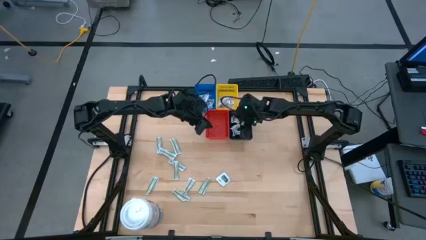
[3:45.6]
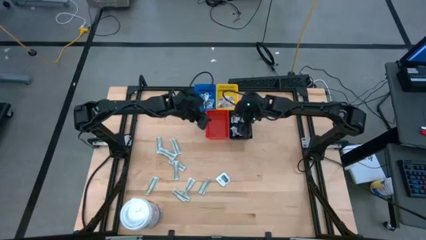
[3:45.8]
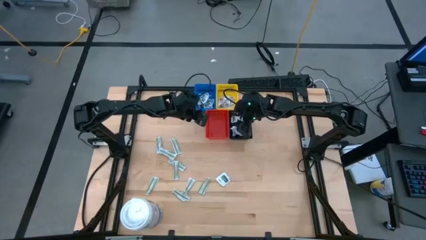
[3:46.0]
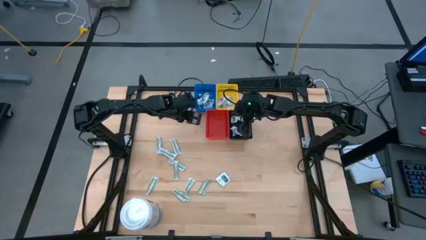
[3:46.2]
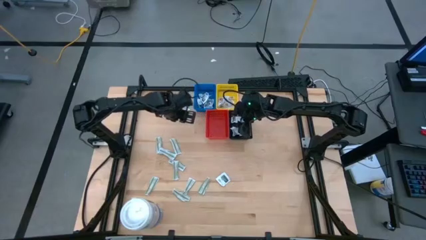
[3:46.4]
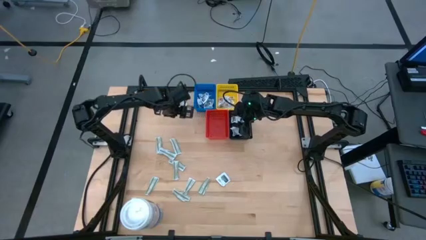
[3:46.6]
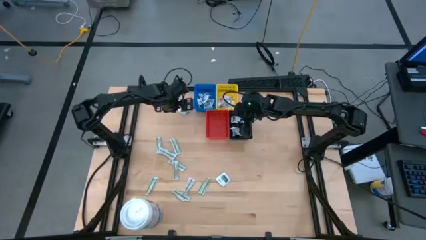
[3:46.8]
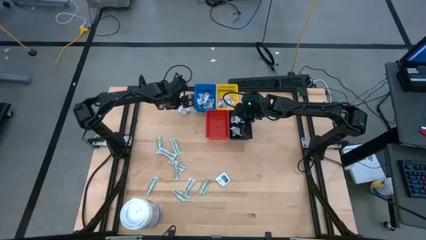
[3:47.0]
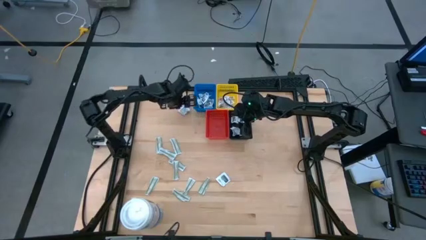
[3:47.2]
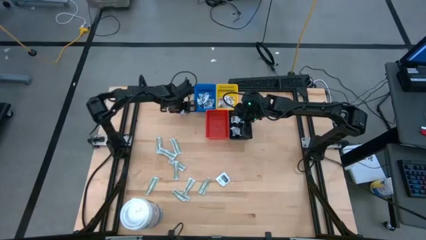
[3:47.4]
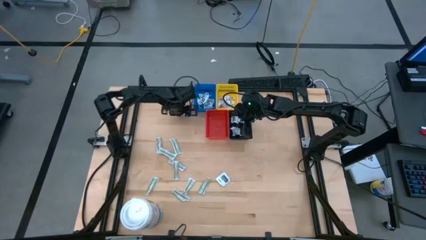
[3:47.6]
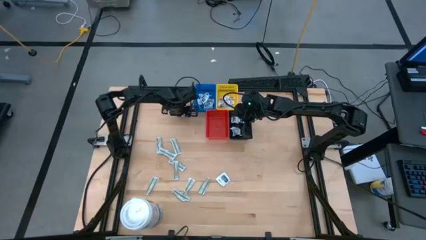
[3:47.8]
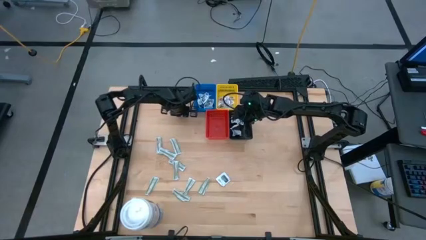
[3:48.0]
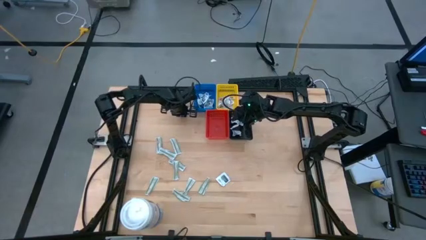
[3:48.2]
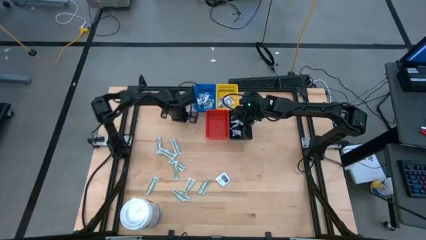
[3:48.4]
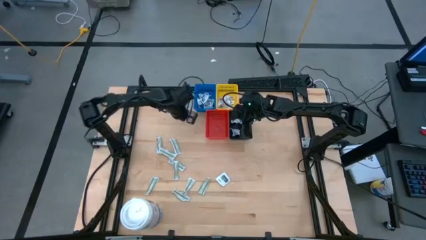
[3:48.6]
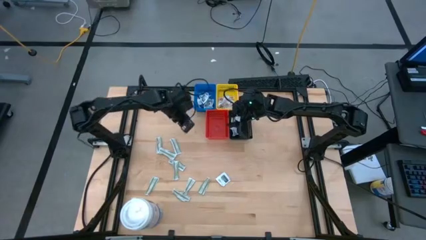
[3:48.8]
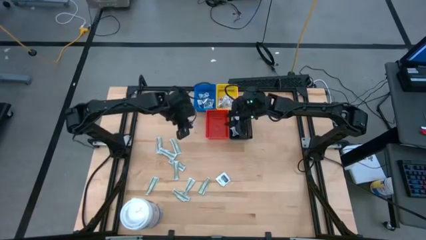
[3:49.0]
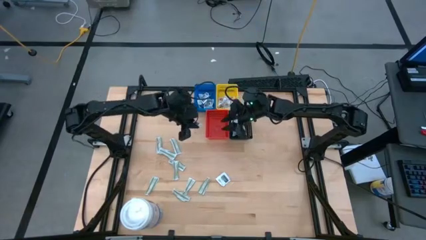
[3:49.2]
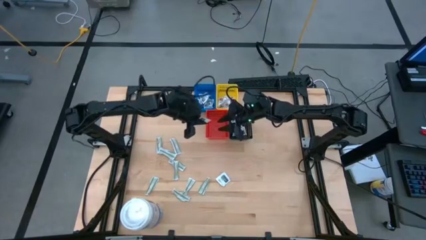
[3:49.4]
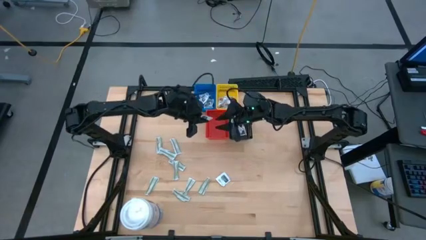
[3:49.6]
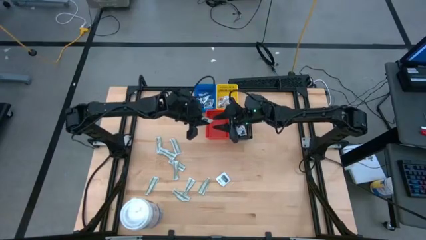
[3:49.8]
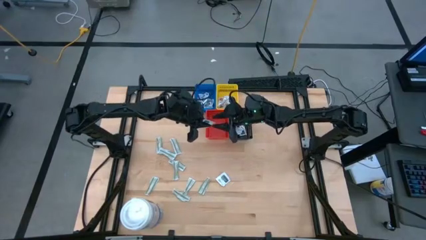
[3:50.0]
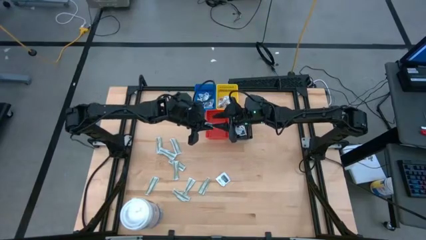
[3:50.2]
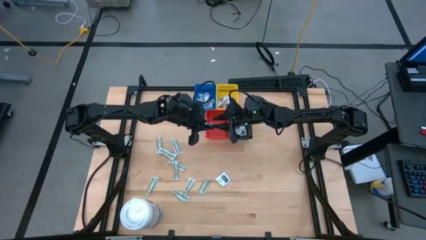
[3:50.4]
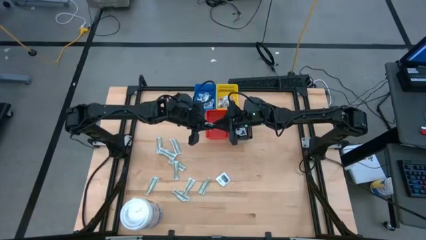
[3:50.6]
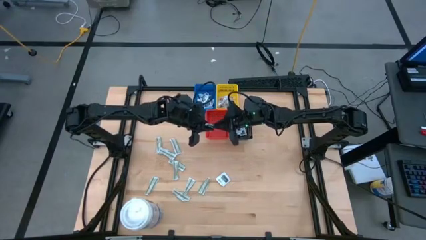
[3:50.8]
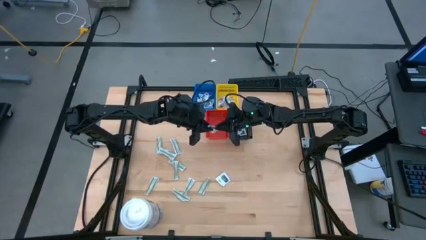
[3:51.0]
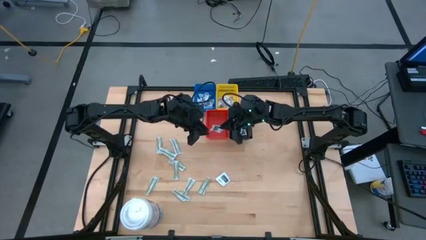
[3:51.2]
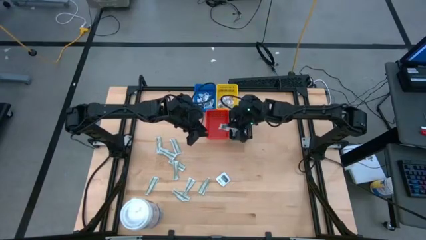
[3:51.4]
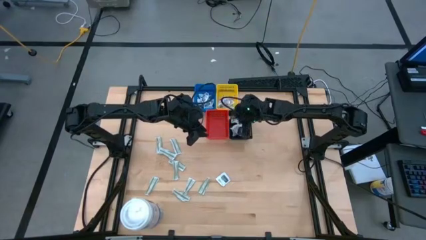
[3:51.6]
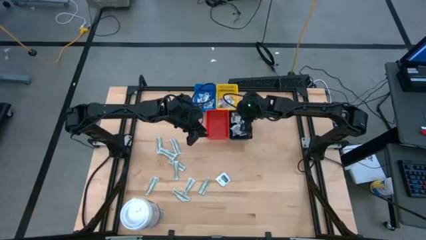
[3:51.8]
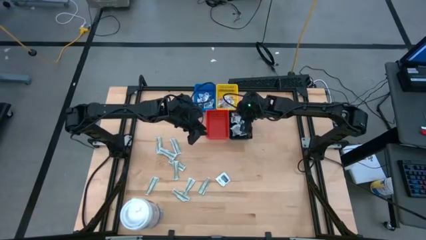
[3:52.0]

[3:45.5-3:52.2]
Task: Pick & Place First Aid Supplies
Put the top right towelette pack into the black bin

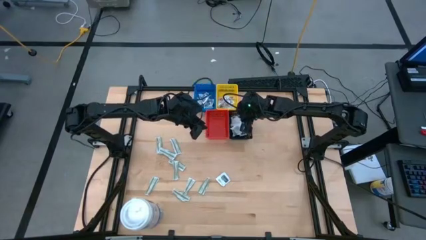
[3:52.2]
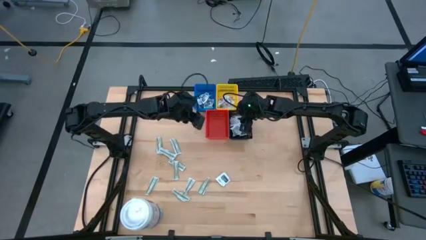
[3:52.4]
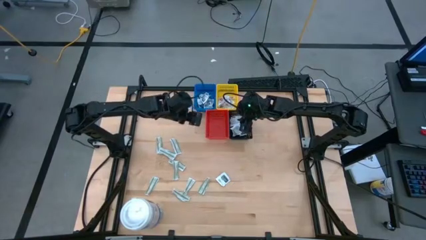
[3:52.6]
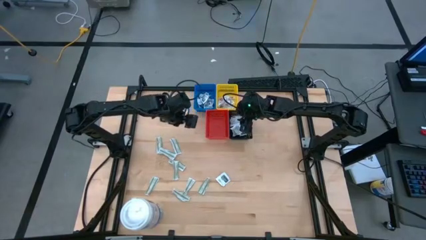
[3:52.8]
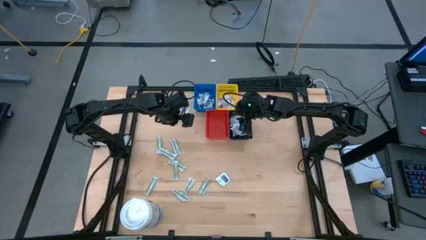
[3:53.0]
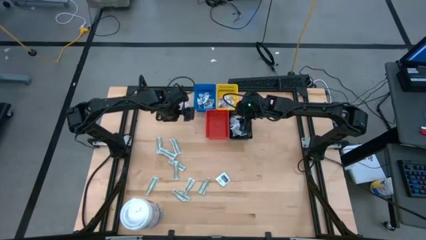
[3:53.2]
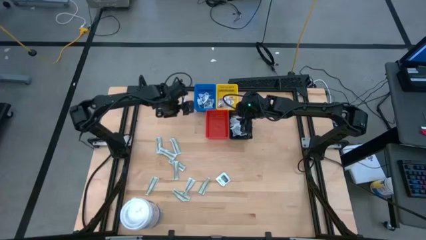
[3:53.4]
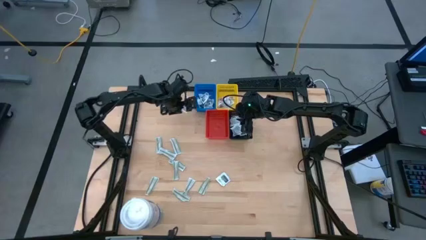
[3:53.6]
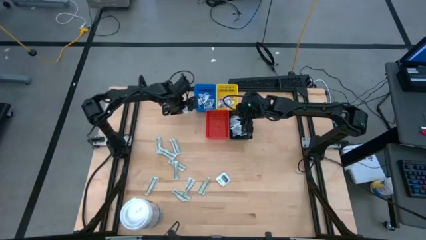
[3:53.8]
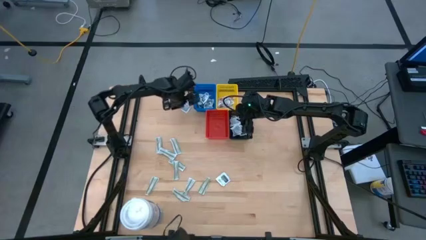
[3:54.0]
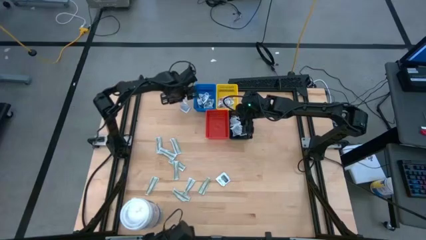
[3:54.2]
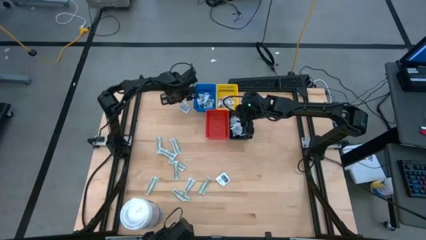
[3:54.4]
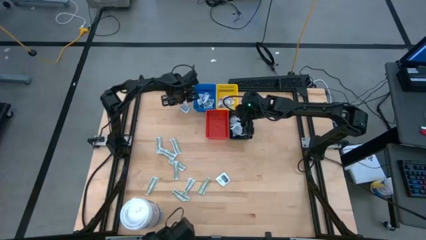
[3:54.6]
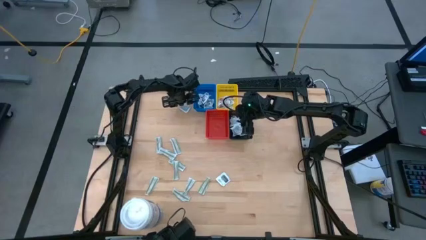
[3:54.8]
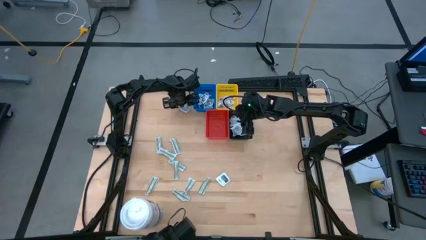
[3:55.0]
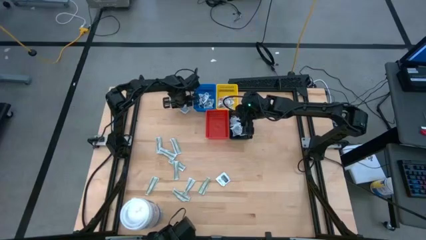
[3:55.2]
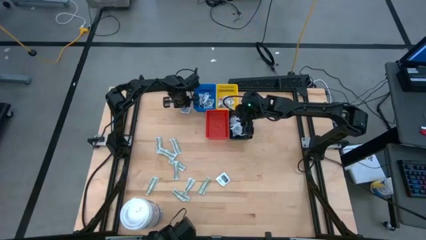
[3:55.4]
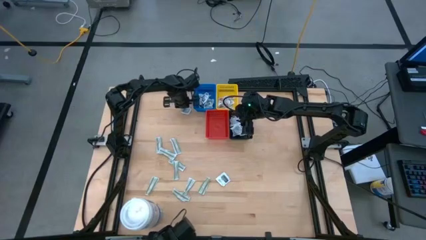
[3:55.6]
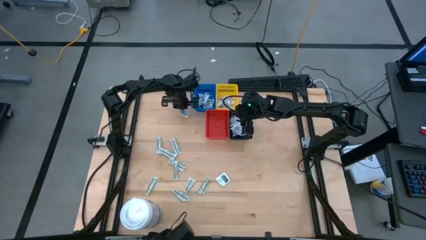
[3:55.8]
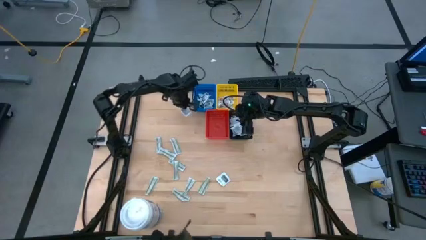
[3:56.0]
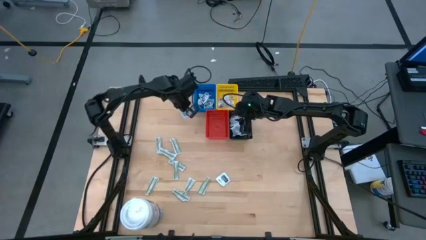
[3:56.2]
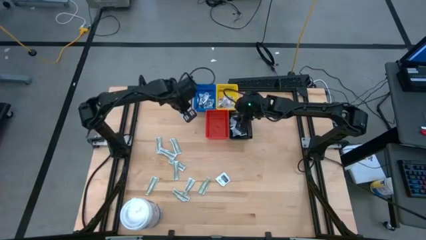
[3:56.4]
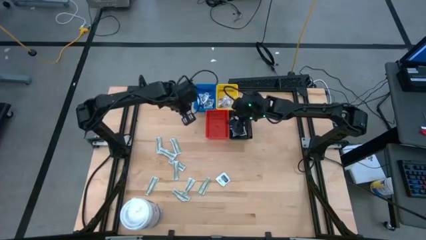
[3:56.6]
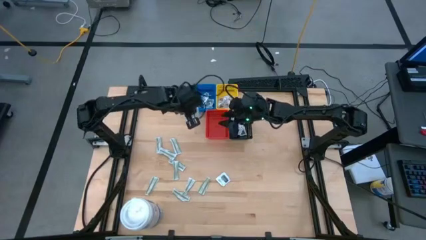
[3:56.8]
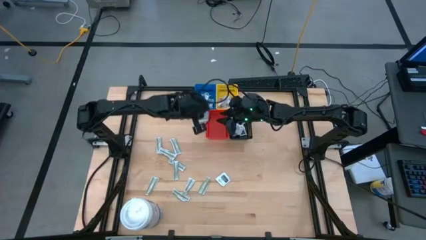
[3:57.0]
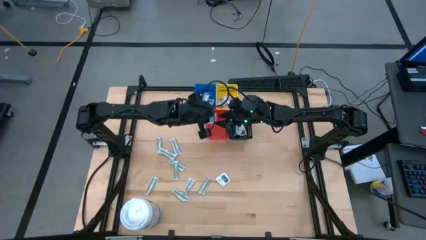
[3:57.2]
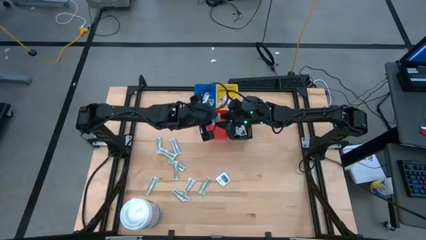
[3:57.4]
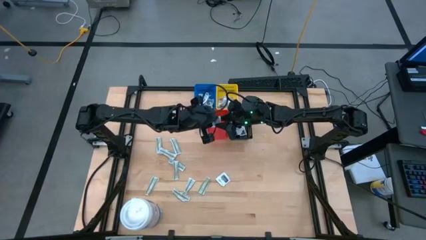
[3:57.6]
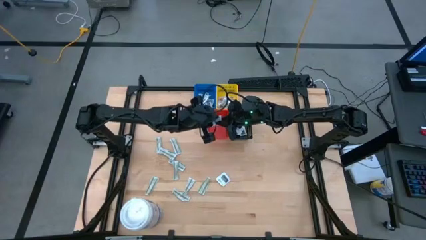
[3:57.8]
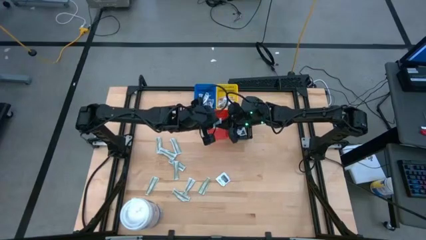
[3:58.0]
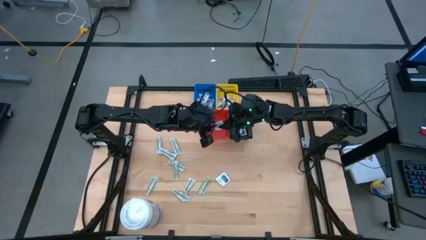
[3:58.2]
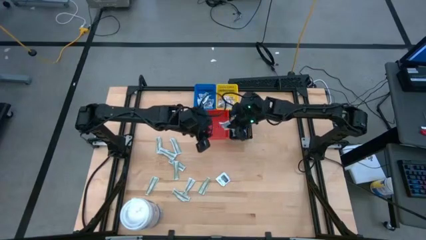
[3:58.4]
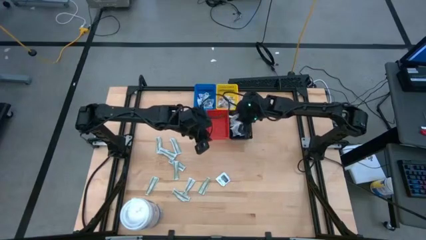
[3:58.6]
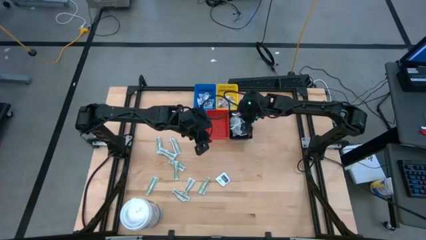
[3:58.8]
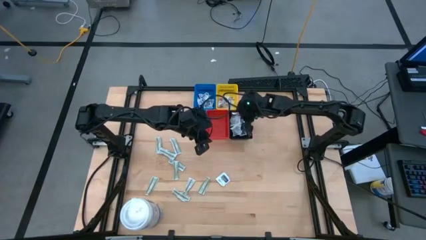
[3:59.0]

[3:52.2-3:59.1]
Put the top towelette pack into the black bin

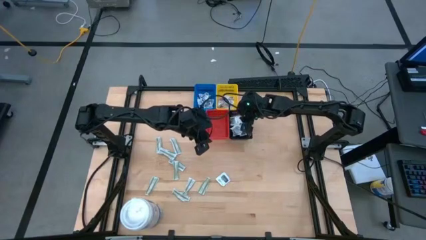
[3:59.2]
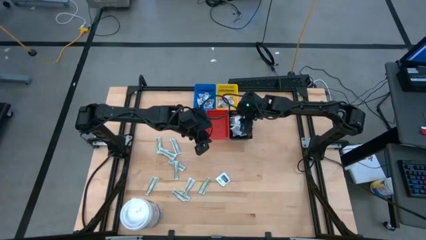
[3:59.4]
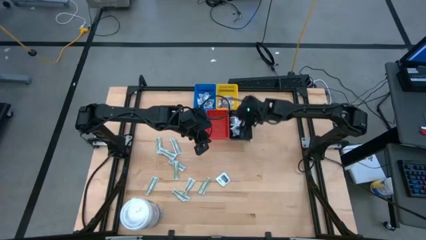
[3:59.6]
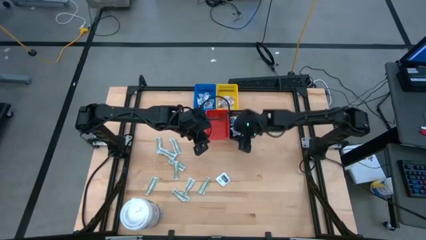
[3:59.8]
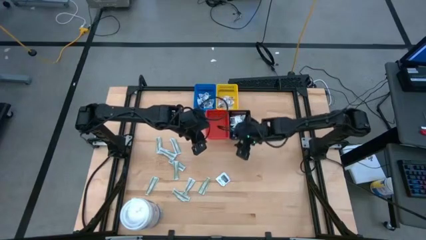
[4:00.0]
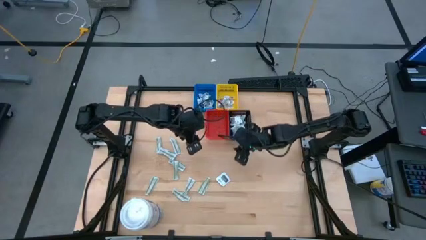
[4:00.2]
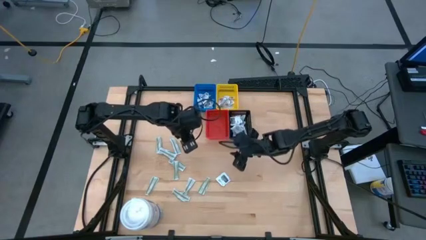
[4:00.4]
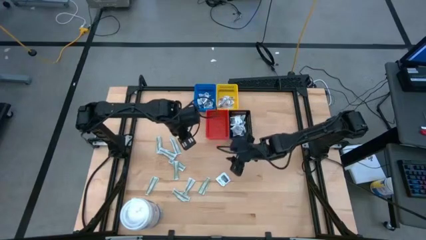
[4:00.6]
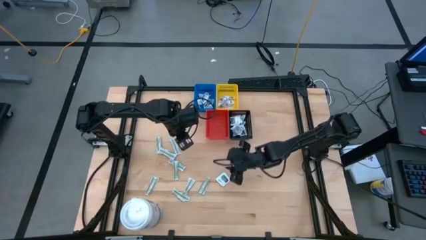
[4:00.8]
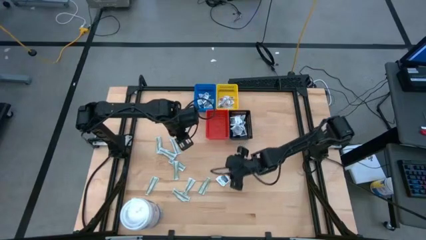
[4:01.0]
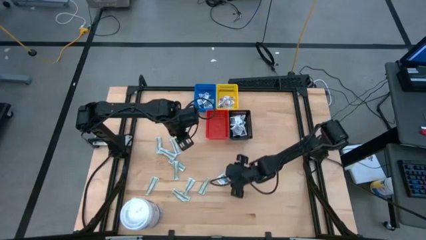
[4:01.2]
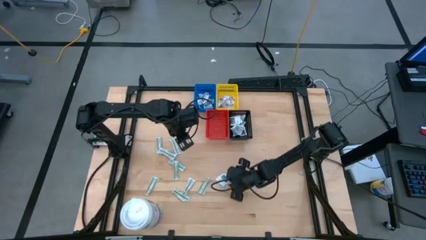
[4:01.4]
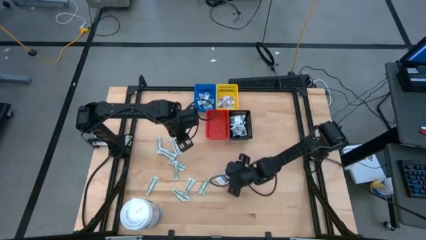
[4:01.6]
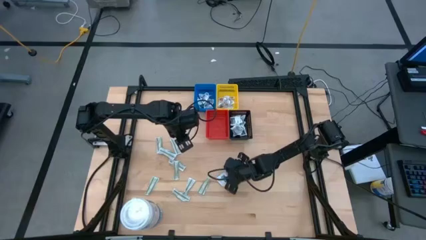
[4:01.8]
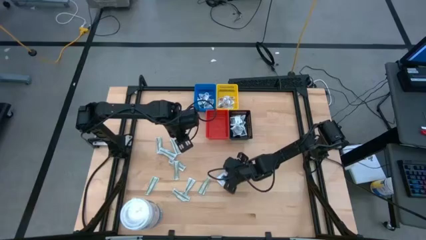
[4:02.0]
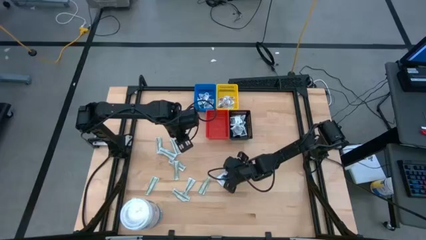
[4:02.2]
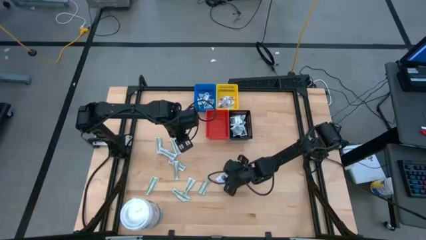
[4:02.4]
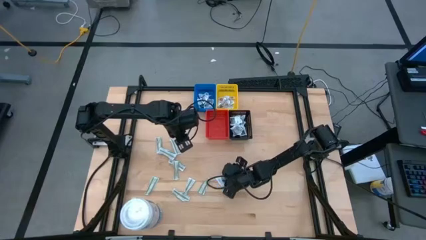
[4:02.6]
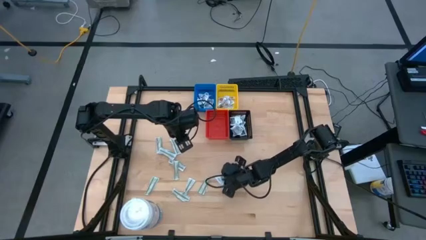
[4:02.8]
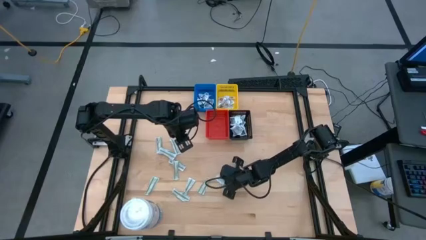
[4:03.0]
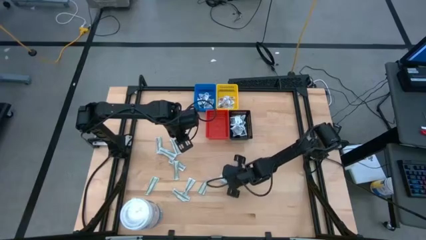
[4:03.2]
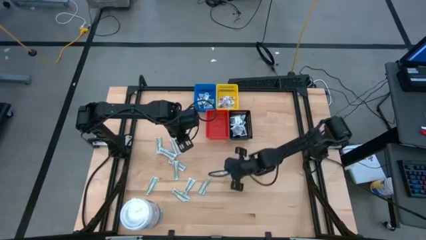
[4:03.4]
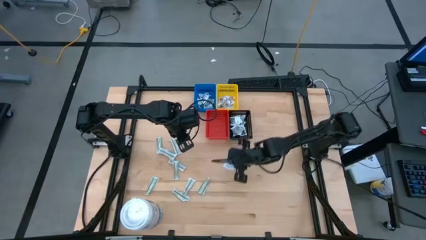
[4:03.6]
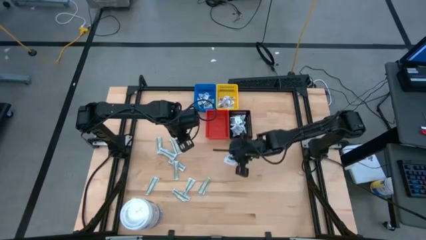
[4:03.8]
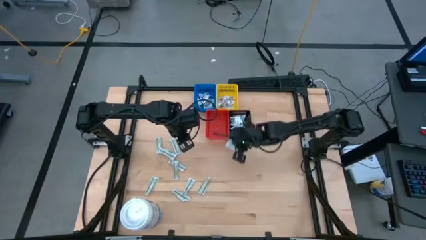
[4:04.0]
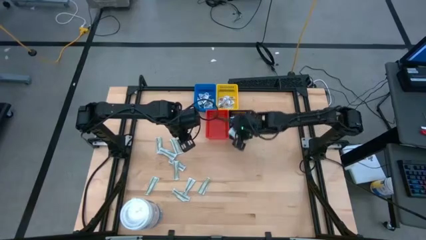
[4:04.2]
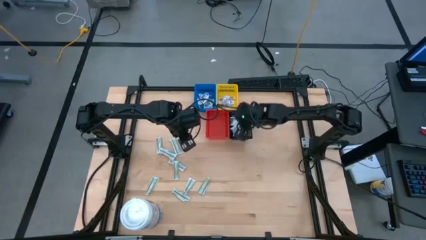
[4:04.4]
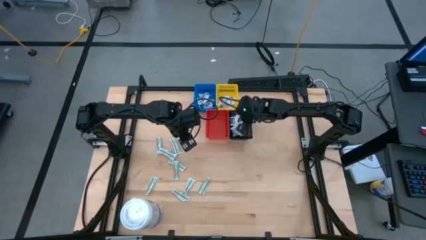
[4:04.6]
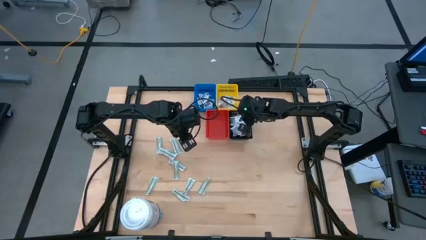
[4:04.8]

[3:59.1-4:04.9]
Put the towelette pack into the black bin
